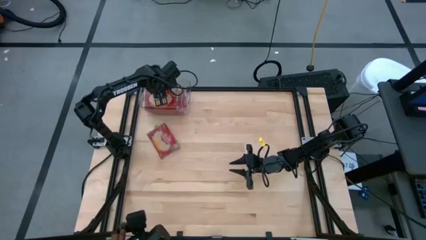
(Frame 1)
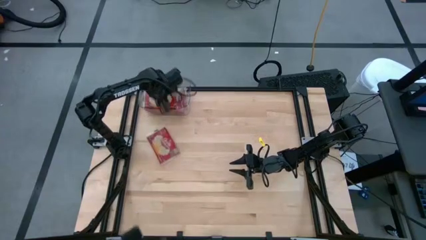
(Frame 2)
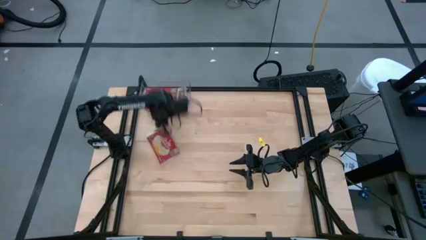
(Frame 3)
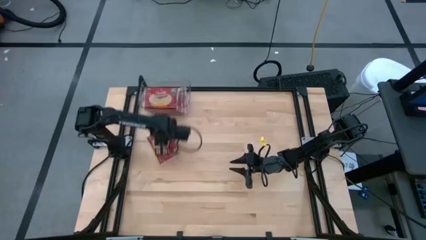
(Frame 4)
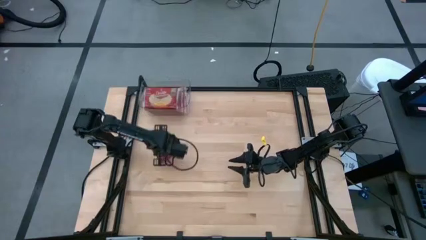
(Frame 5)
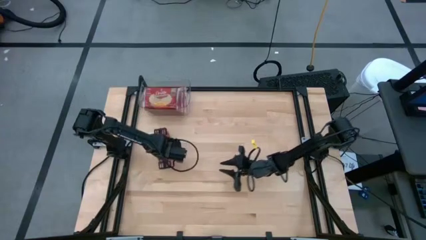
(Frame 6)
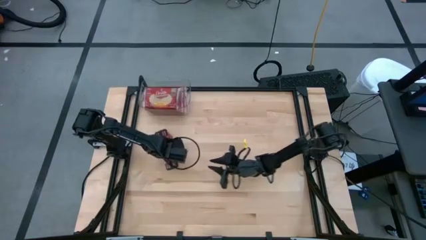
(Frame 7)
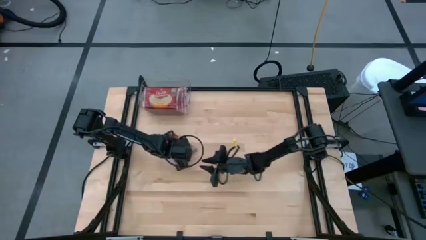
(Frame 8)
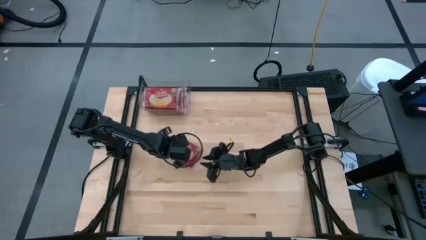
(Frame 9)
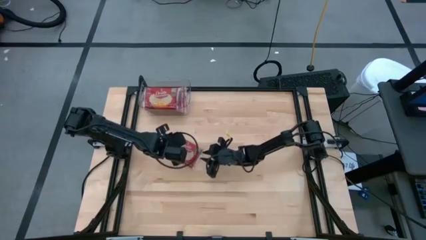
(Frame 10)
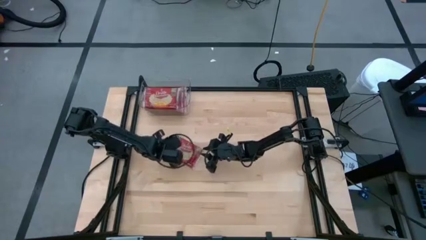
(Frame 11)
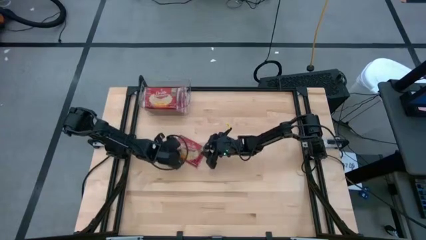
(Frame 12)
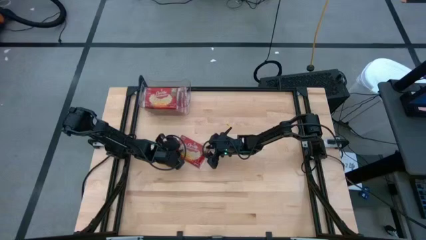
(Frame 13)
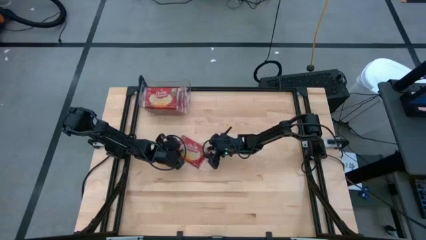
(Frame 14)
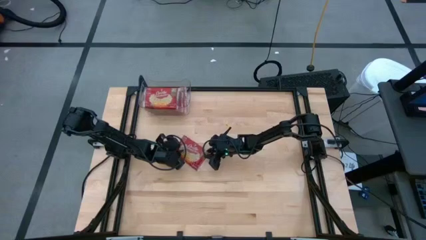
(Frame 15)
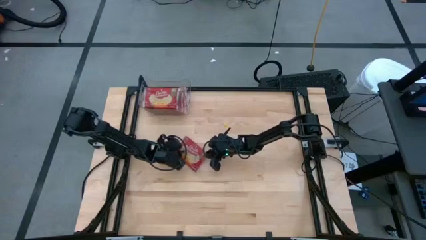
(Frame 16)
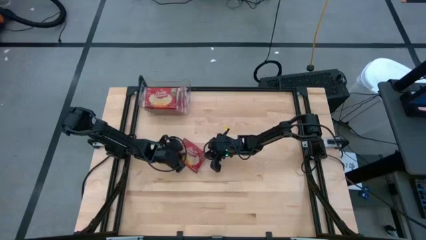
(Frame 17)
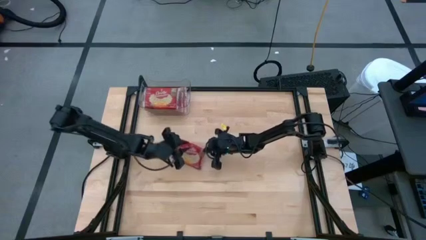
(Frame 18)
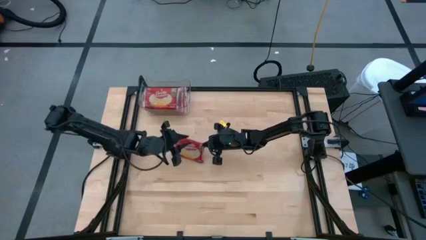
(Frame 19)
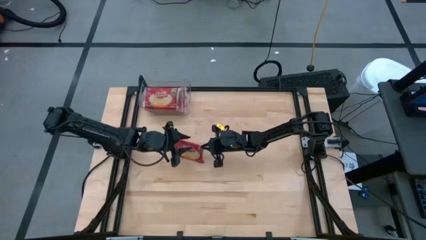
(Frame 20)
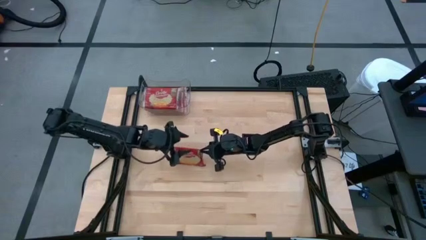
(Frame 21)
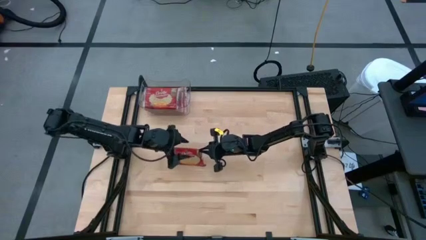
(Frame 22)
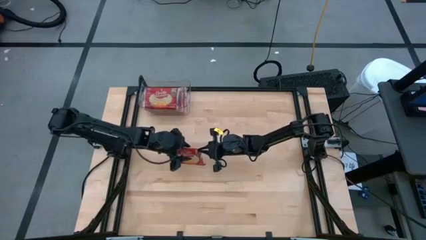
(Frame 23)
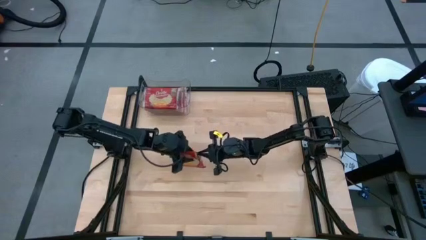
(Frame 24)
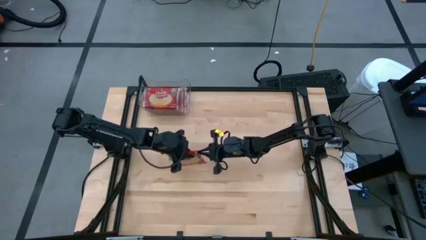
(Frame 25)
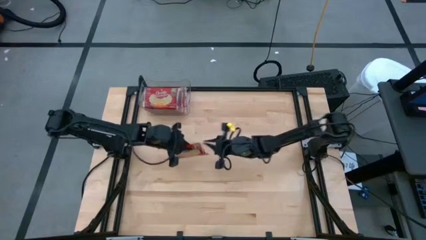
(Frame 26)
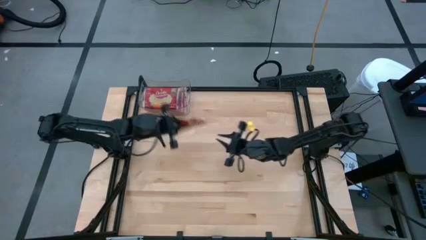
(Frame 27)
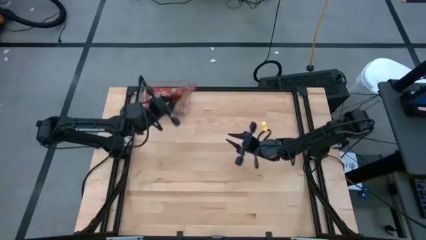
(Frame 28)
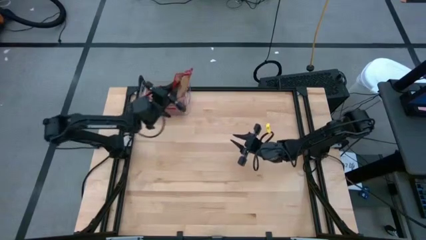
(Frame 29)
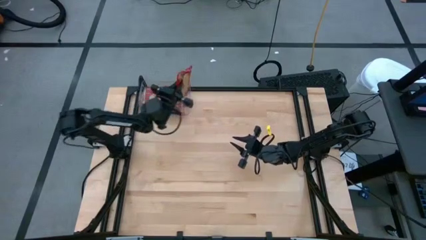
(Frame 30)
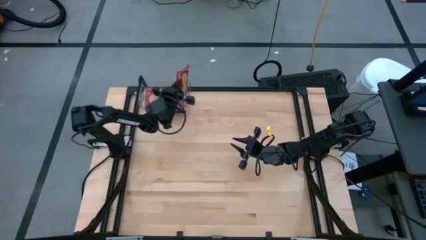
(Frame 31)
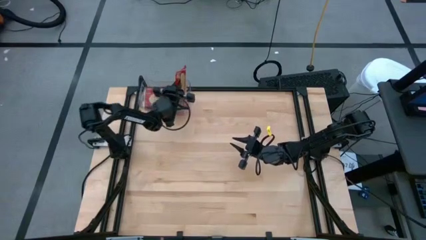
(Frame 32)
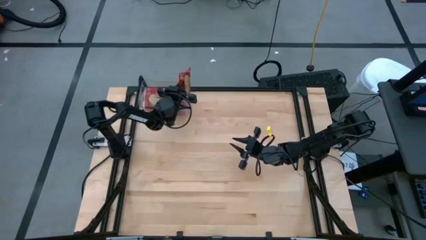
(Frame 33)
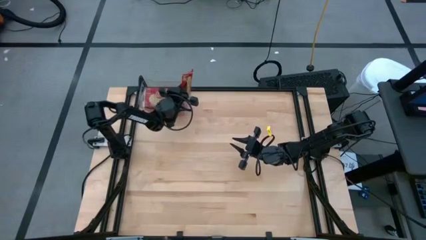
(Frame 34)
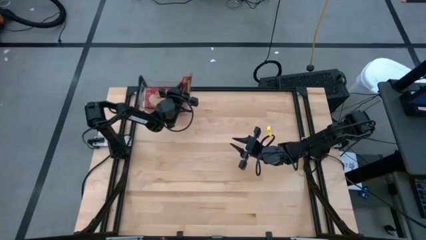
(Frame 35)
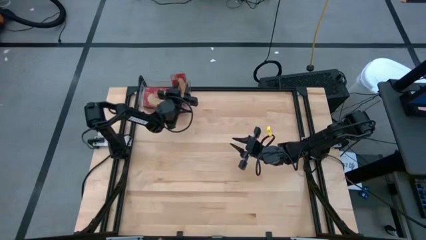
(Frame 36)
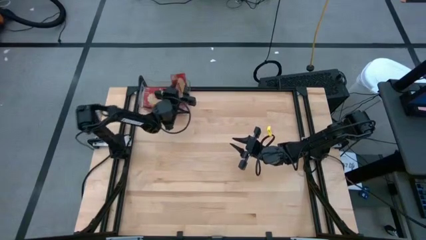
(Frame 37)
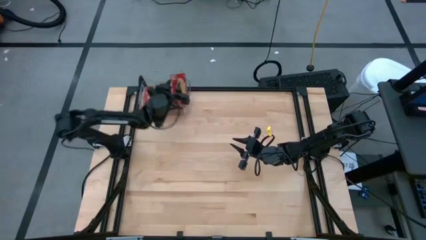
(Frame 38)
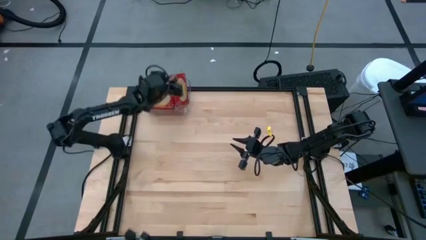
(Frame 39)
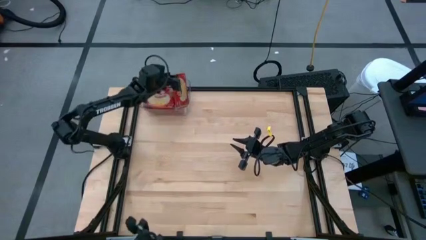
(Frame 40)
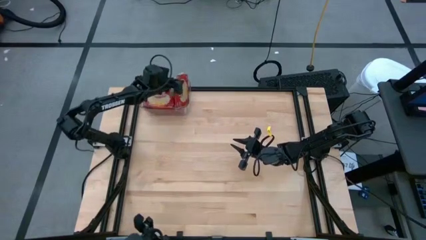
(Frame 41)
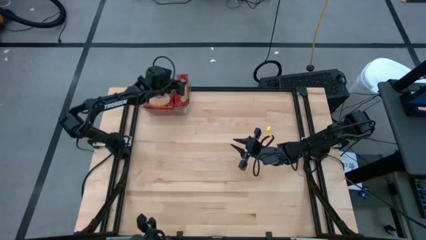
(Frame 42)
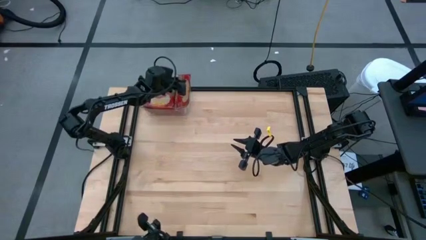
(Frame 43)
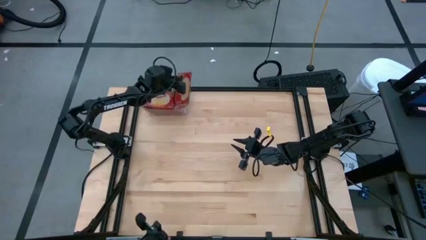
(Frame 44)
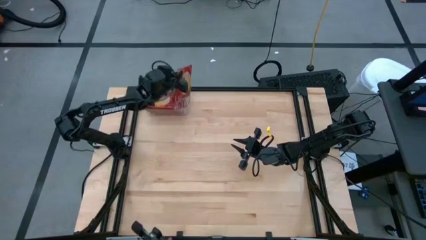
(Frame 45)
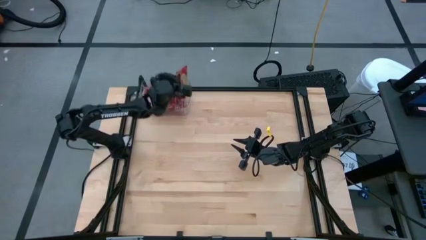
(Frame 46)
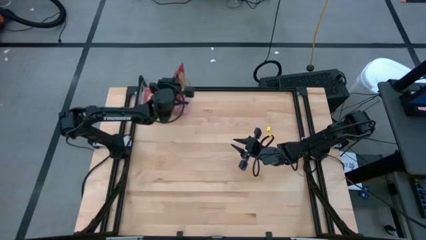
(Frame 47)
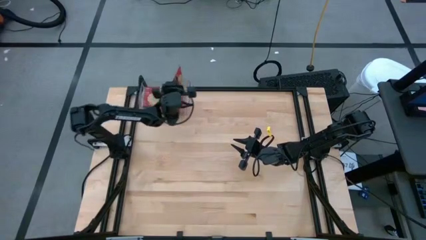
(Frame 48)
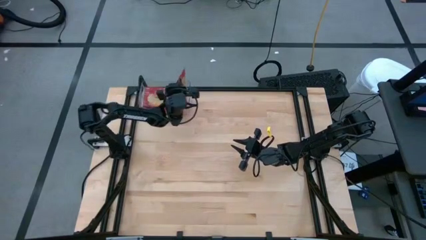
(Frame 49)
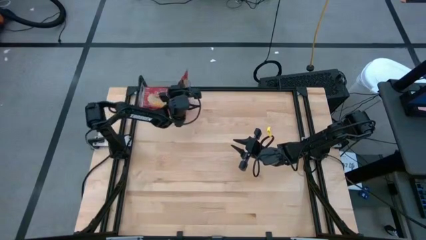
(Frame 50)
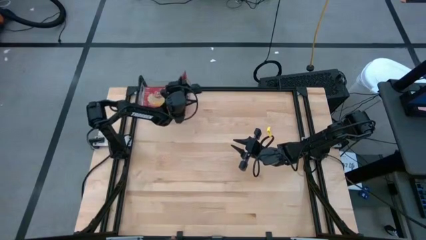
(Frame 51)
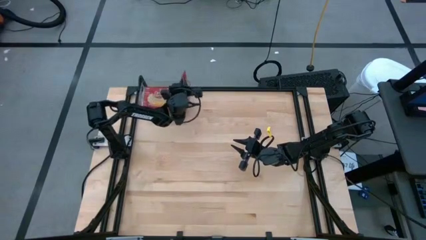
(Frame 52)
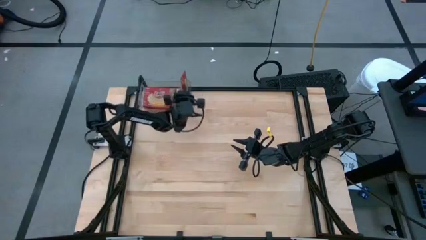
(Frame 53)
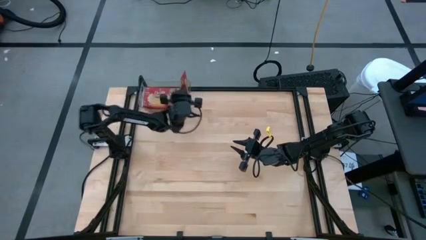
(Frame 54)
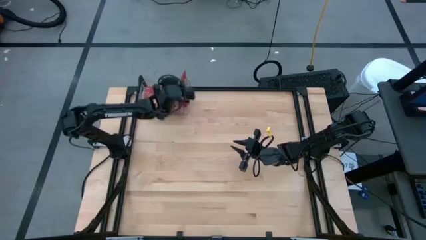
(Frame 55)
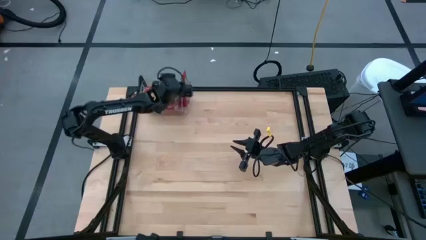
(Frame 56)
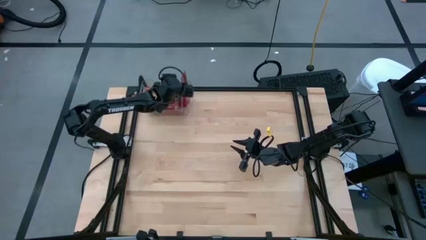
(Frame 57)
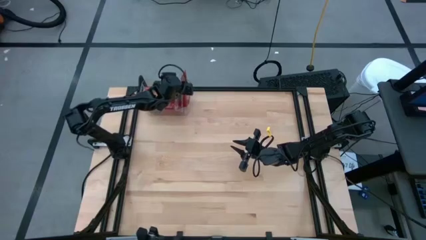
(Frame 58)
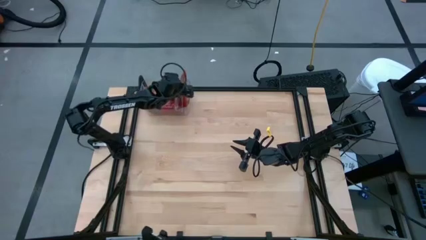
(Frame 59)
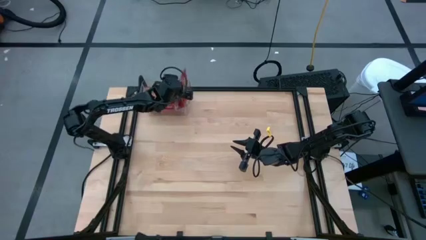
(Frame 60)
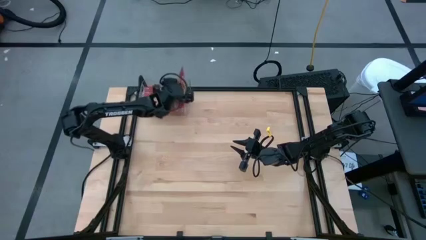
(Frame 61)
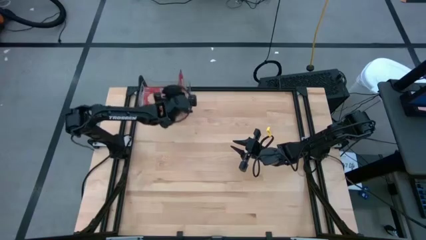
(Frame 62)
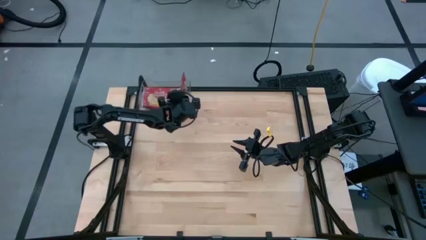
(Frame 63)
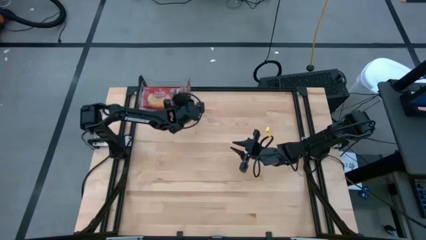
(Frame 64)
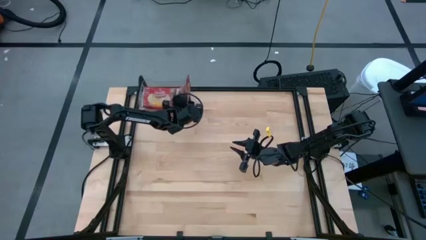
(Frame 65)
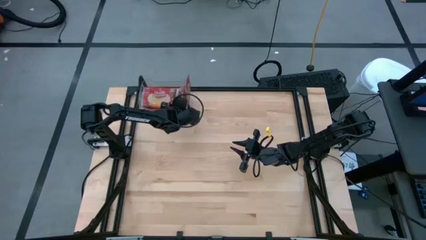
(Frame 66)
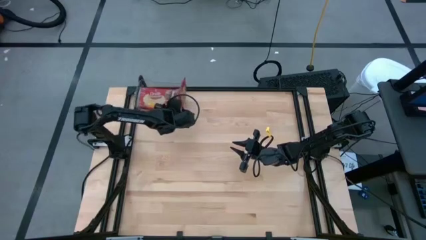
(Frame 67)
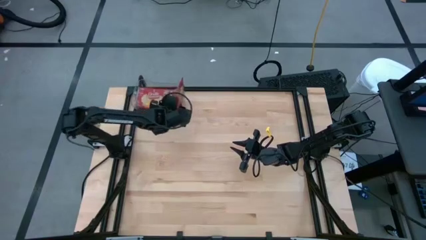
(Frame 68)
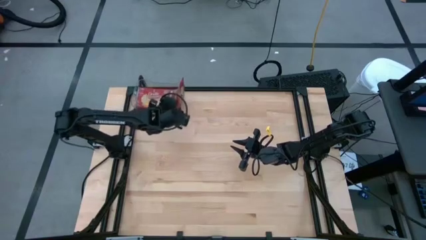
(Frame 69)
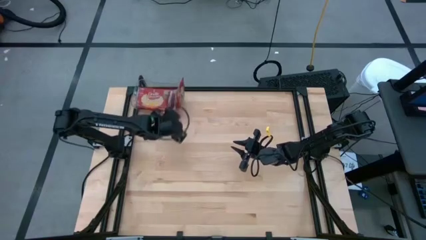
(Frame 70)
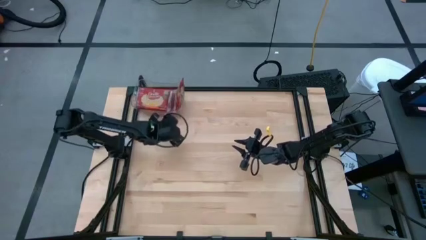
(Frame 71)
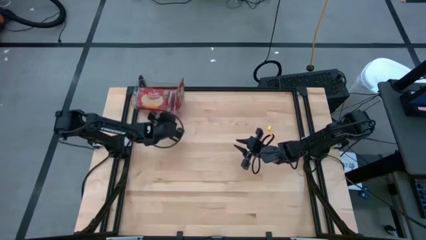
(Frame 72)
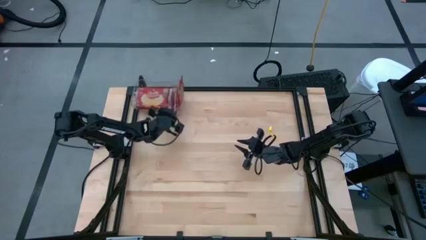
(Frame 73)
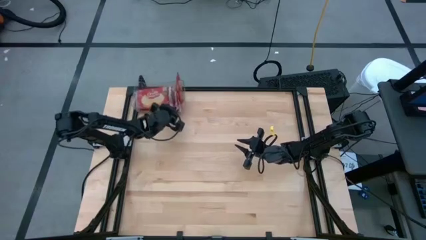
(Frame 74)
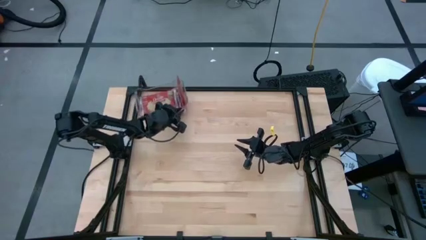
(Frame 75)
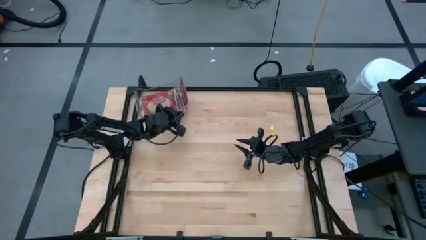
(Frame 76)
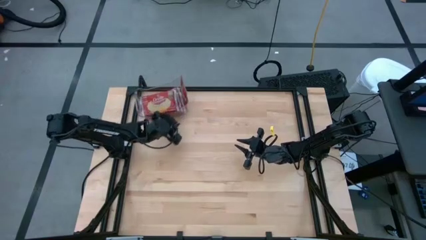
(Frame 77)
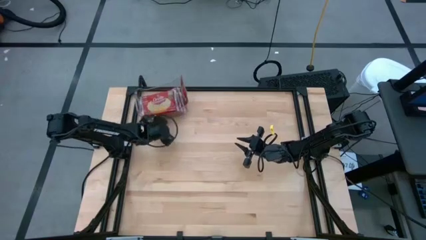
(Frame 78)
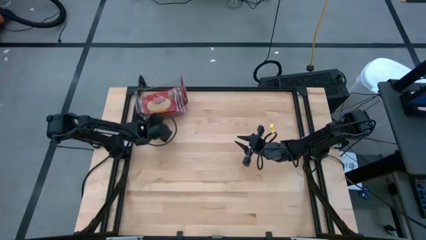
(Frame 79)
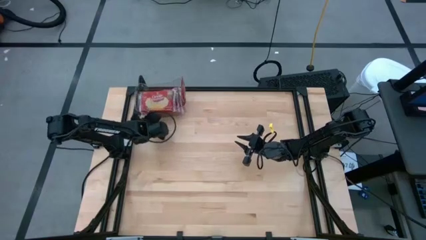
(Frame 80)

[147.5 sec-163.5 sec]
Task: Sort popcorn bags into baskets
Put the red popcorn bag into the transparent bin
